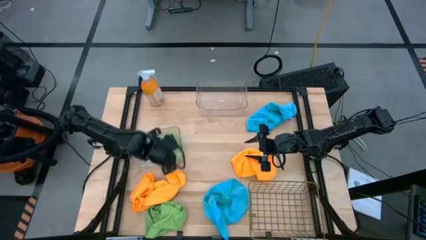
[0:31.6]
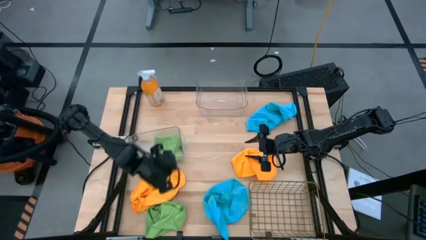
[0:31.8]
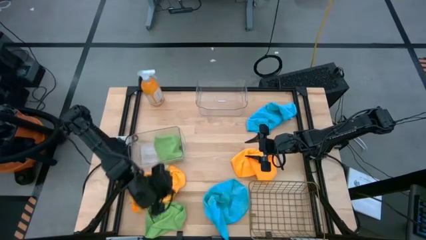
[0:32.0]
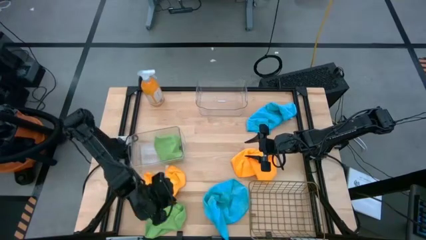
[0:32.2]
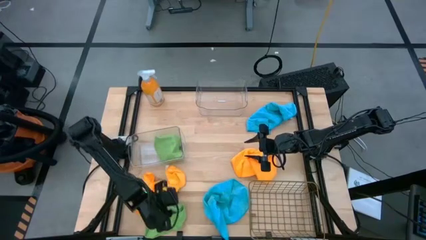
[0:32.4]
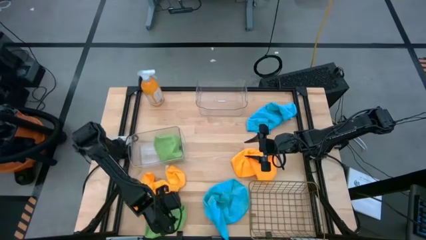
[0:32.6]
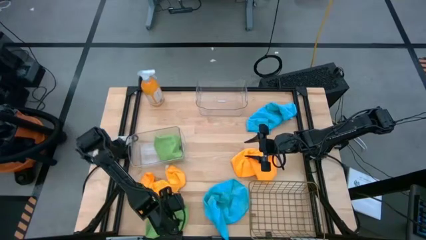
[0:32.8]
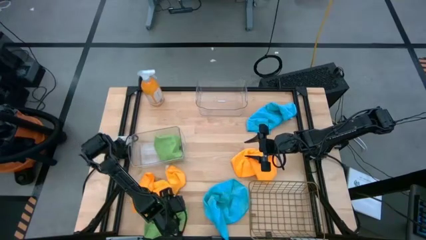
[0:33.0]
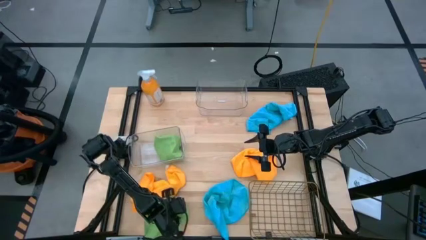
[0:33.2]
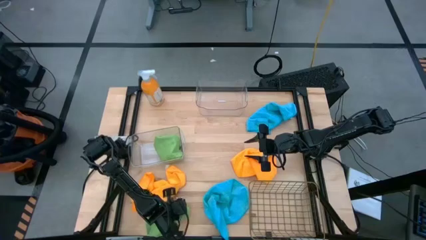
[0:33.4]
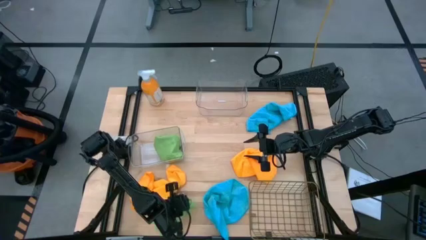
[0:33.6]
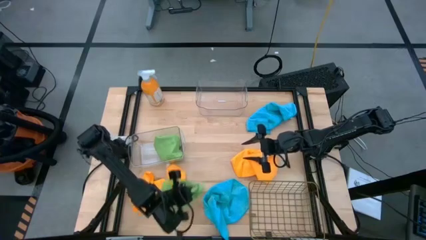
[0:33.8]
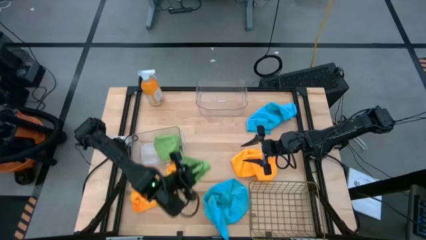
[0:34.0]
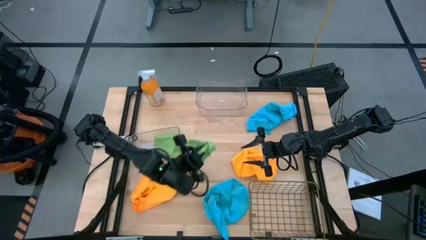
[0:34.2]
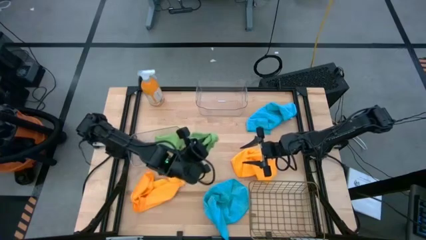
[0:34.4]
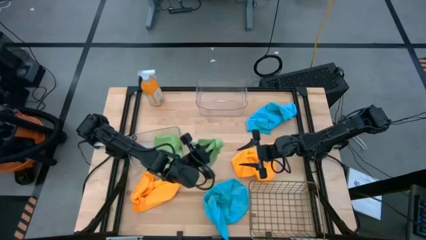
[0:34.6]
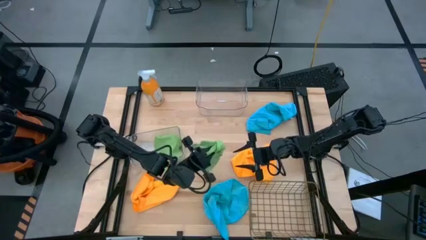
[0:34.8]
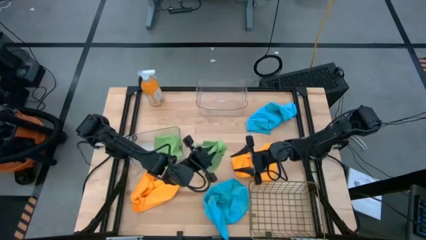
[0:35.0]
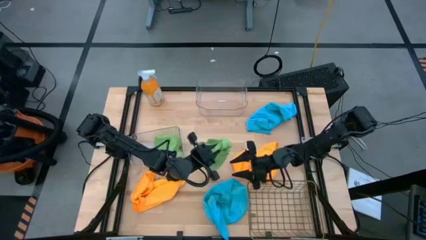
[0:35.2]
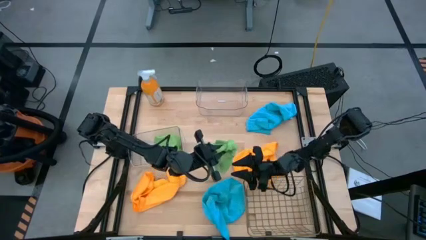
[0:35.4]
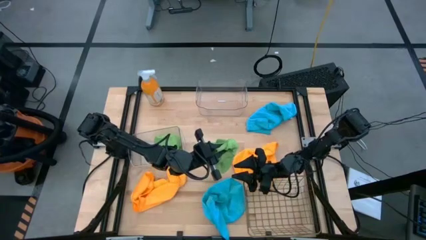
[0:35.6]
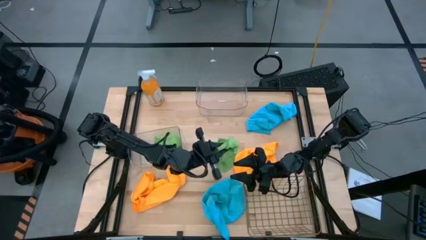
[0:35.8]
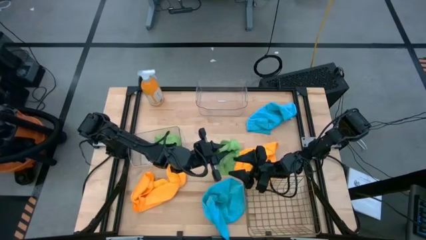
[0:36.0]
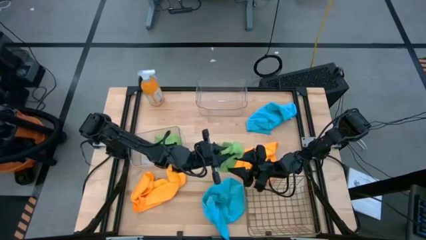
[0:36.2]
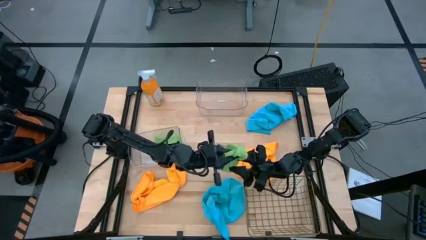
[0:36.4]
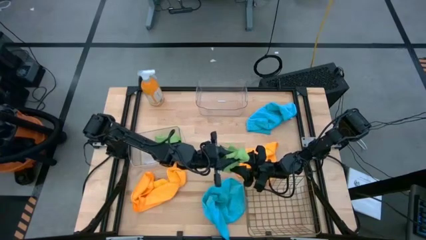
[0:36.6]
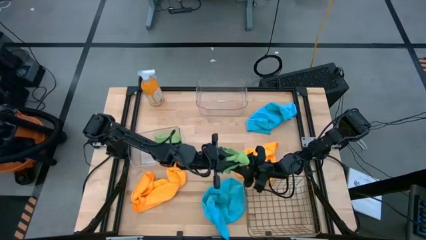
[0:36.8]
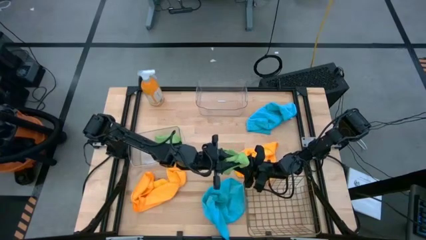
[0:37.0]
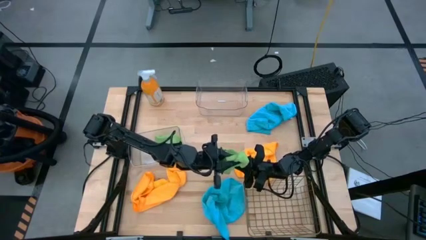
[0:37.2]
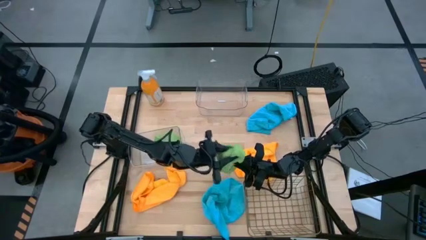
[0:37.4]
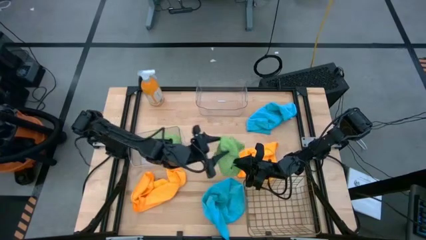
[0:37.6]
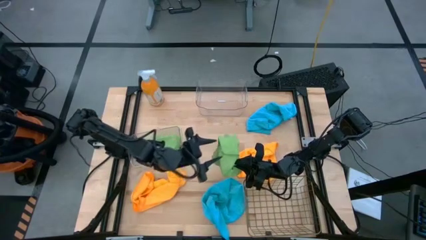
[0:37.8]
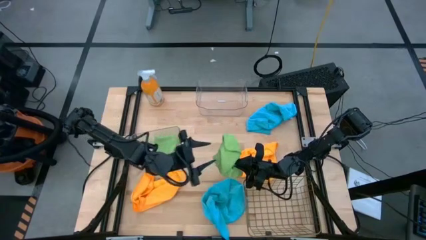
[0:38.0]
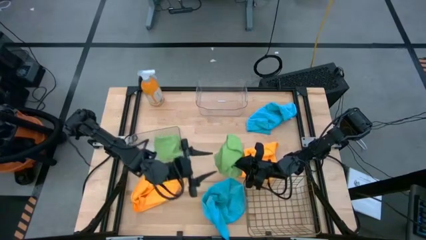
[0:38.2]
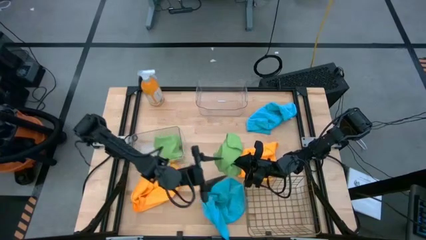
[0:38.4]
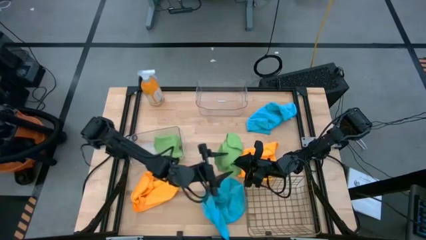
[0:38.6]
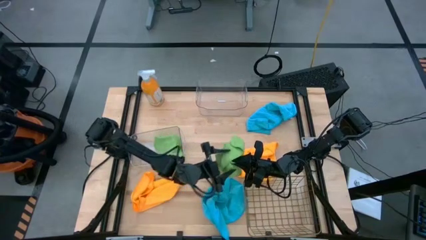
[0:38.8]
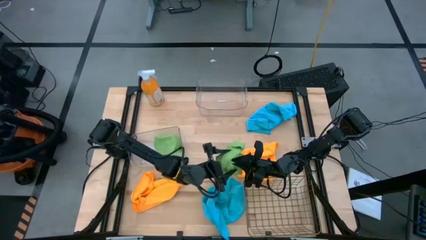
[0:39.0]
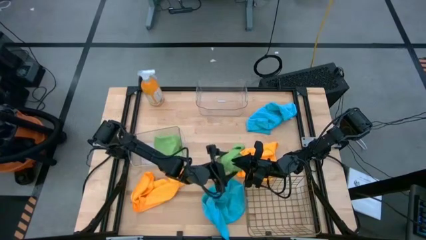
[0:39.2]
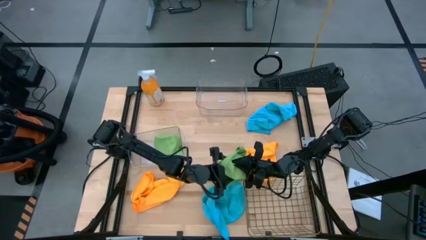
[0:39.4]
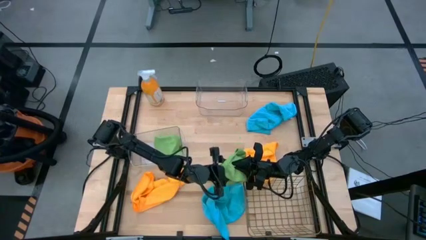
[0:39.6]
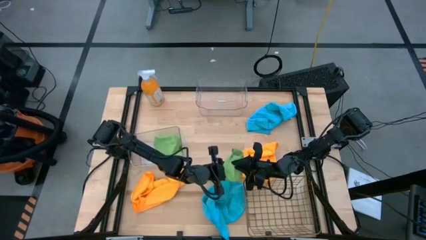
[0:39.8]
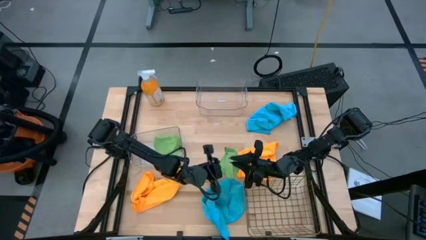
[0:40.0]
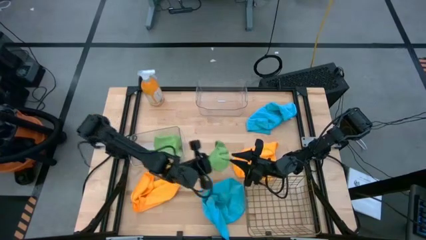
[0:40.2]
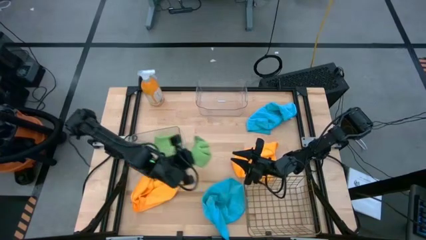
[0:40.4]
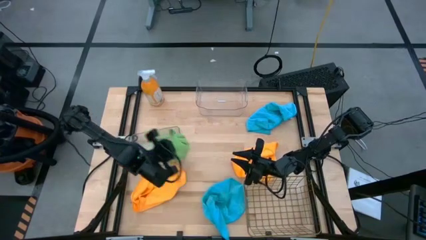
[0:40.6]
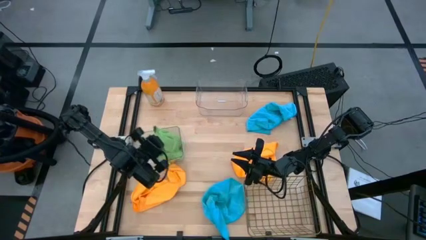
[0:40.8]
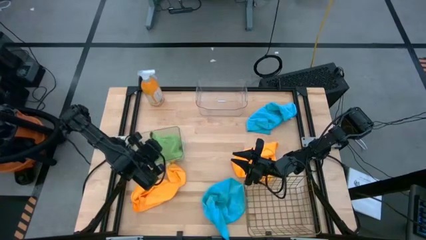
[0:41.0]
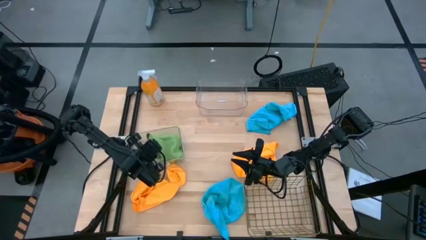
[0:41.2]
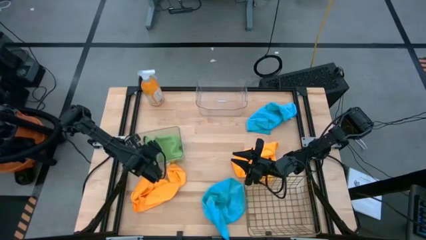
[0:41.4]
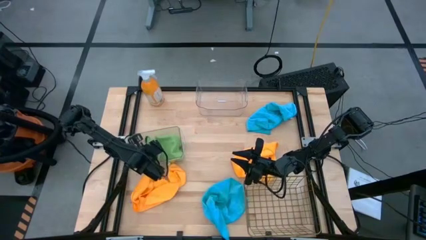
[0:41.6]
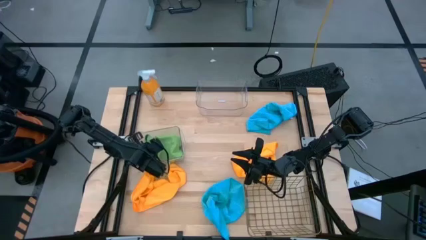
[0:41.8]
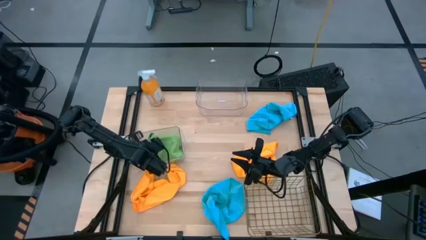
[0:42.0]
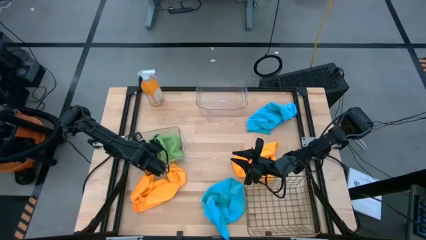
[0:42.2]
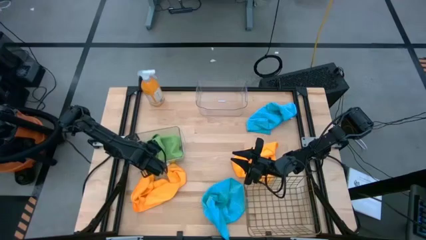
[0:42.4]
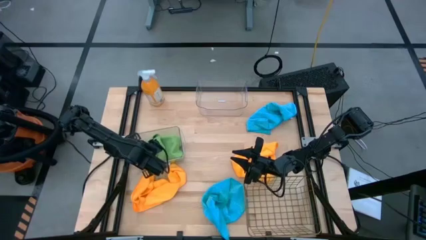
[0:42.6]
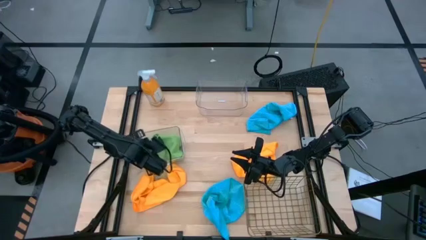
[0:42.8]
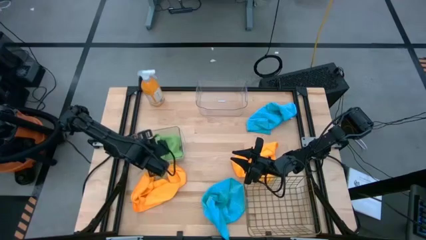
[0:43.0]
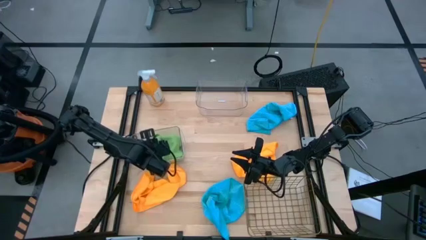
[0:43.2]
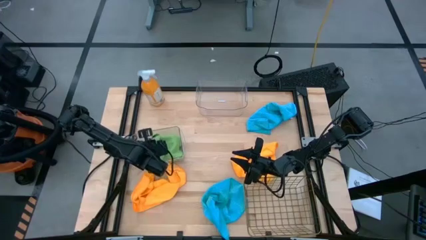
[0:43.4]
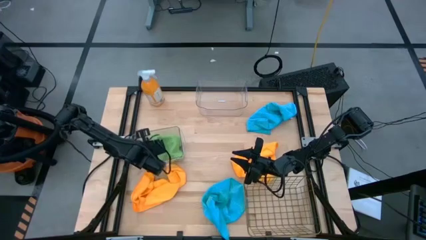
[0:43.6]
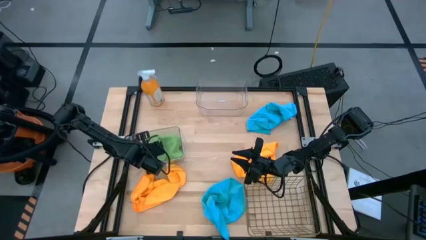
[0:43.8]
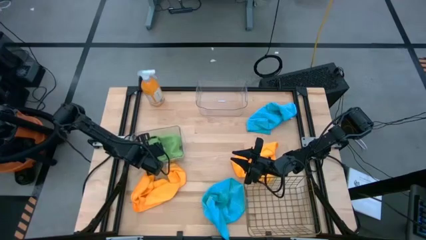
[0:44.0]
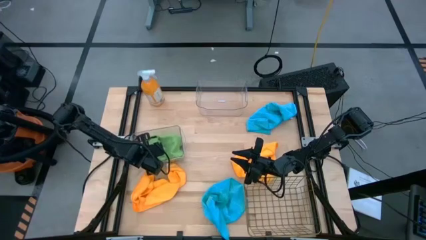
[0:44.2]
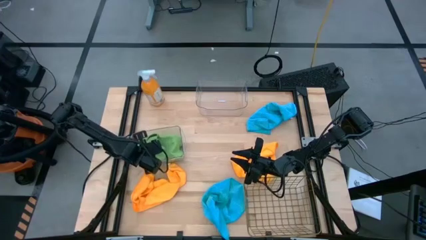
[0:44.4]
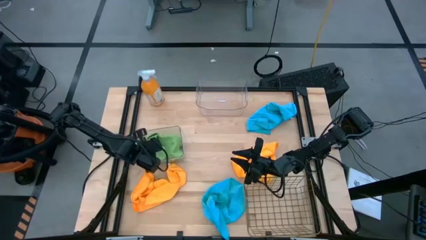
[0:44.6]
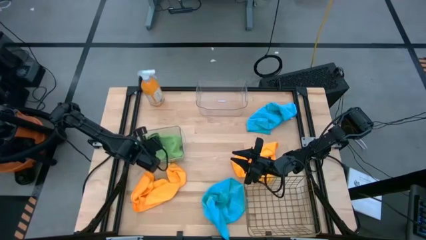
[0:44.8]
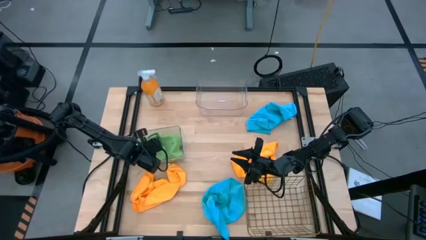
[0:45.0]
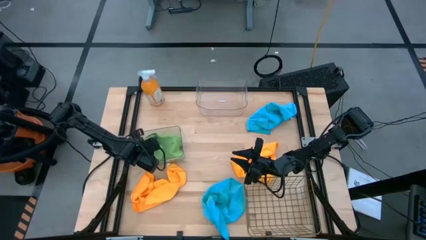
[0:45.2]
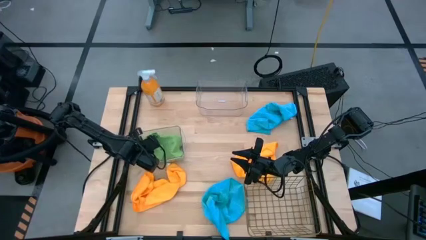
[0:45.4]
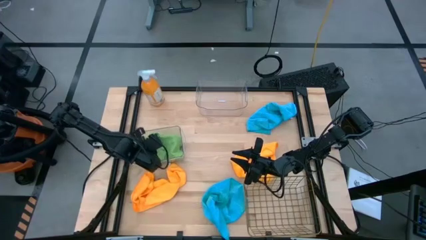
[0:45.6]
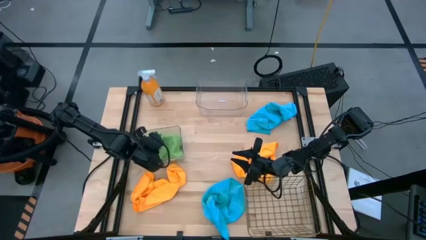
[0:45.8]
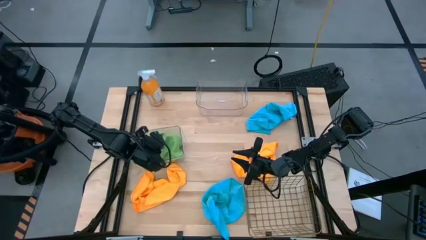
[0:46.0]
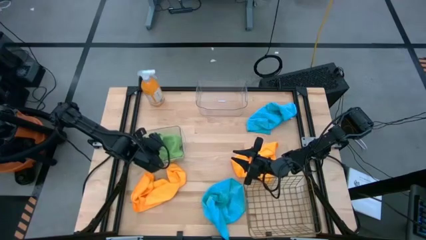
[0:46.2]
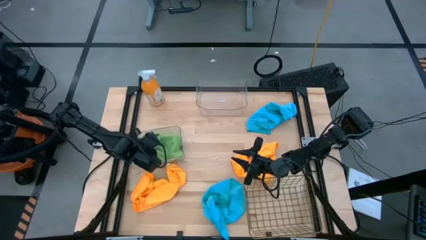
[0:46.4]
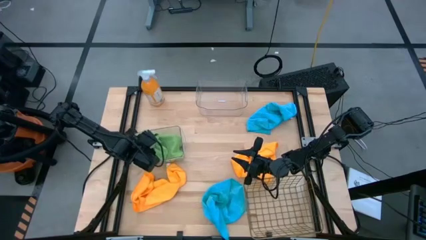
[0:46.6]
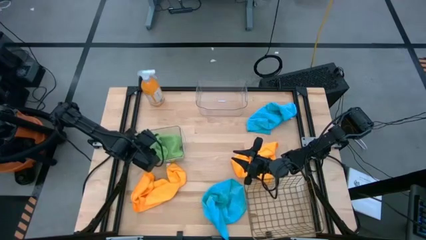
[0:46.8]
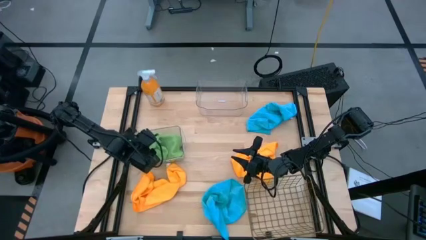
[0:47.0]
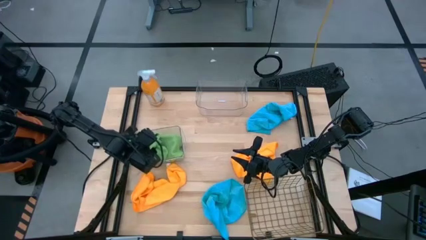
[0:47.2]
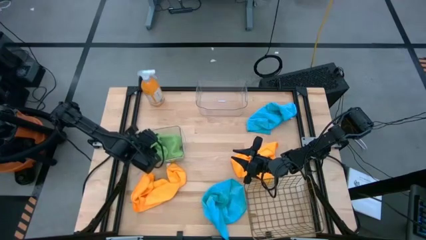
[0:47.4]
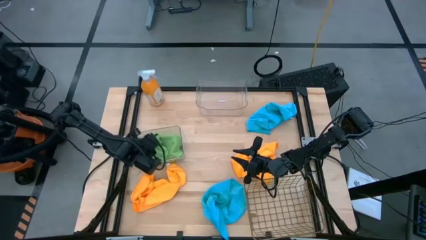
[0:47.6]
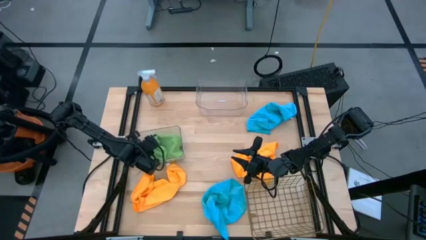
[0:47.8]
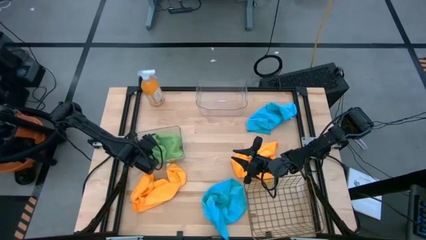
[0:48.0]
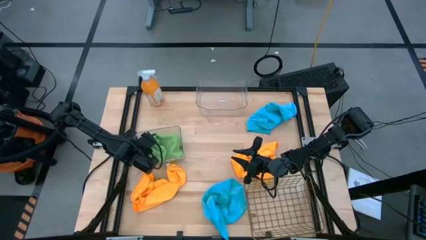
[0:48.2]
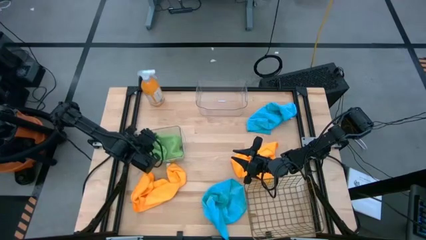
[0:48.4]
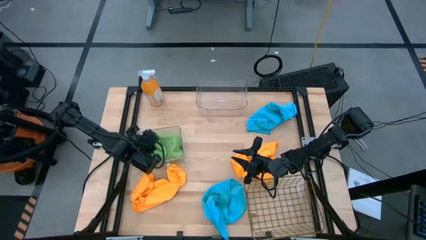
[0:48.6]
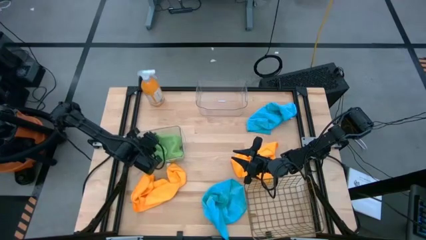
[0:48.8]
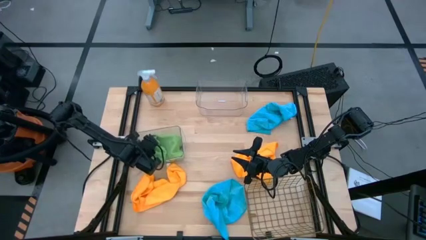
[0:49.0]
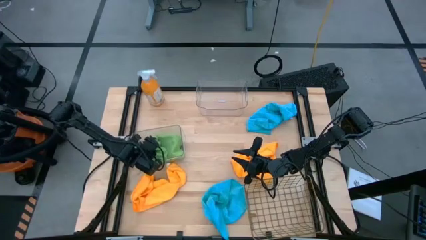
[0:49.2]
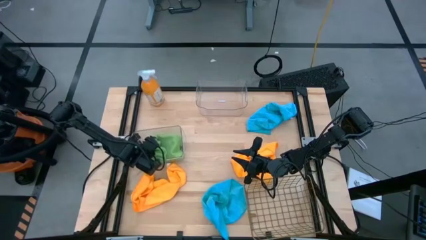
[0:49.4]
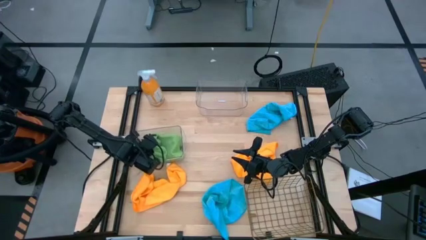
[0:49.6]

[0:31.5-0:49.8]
Task: Sort microfiber towel by color & place in baskets
Put the green microfiber towel into the bottom transparent bin
